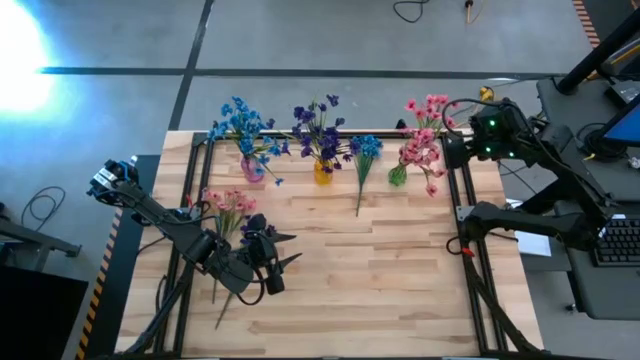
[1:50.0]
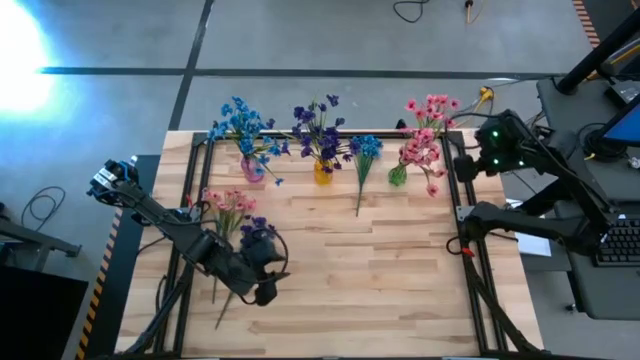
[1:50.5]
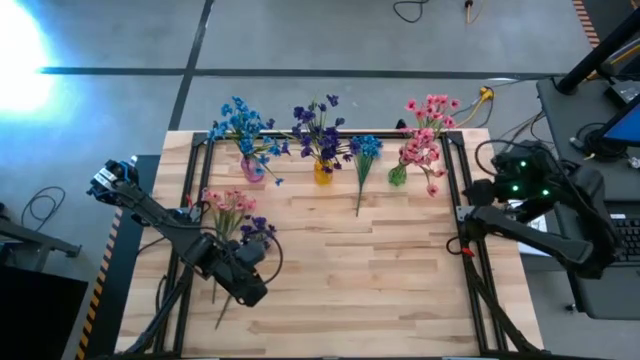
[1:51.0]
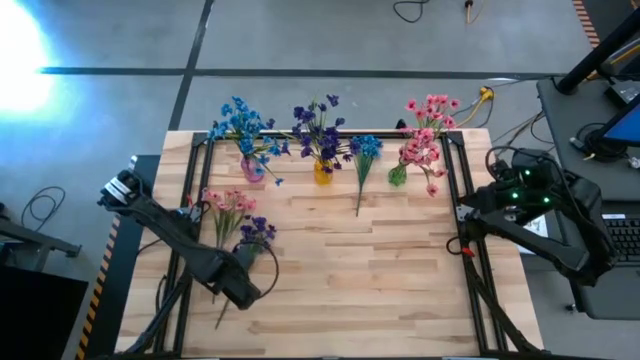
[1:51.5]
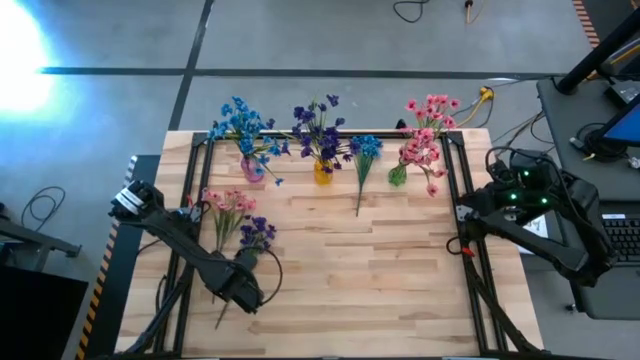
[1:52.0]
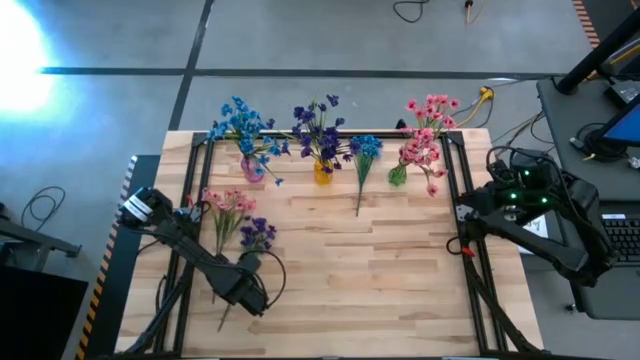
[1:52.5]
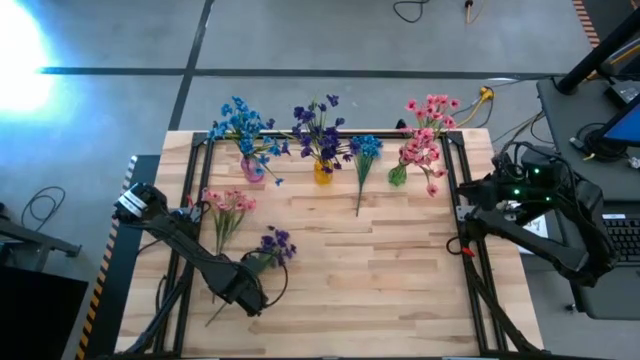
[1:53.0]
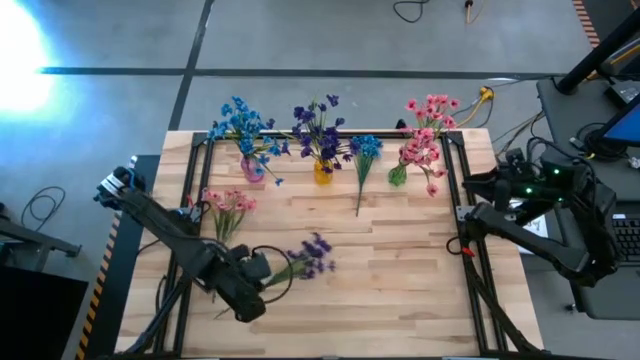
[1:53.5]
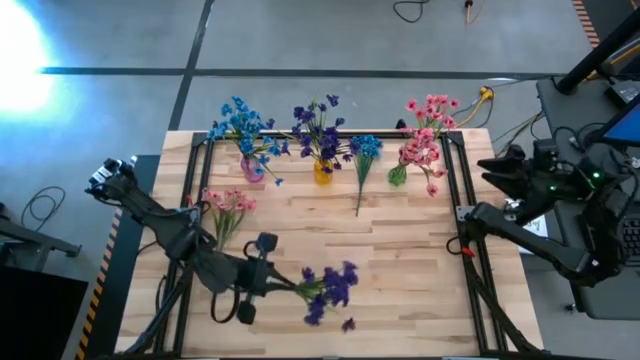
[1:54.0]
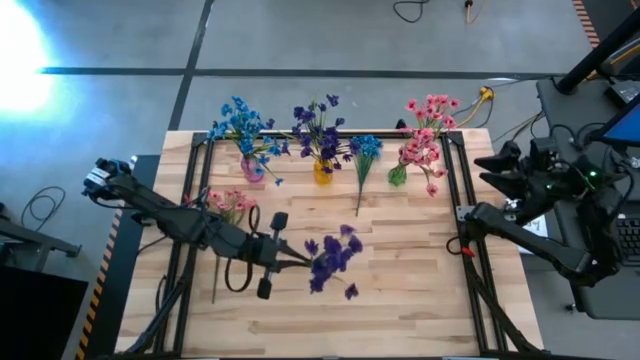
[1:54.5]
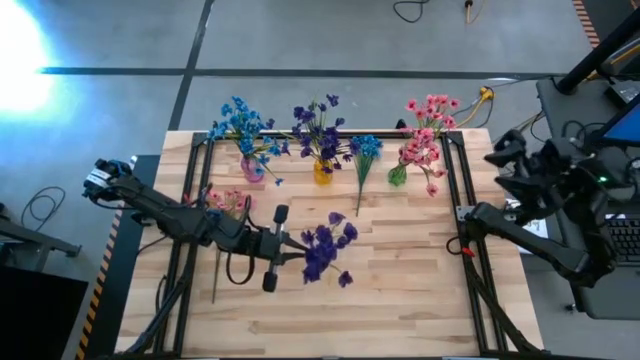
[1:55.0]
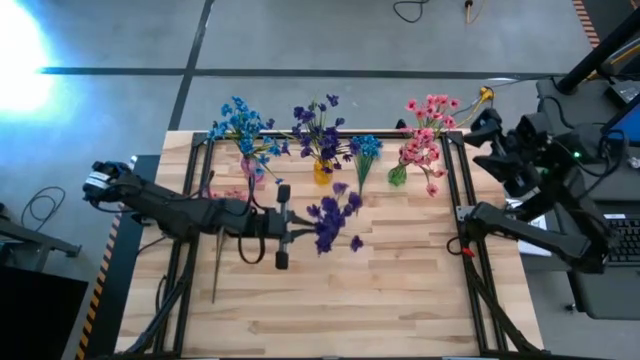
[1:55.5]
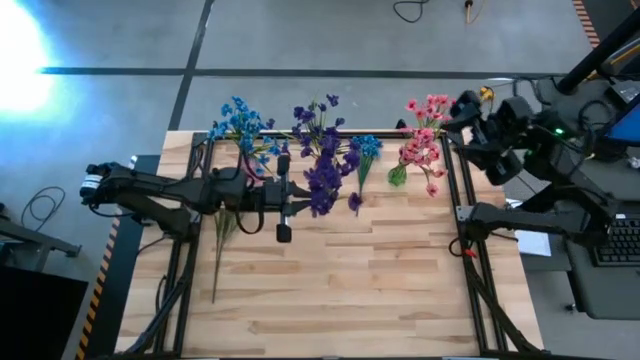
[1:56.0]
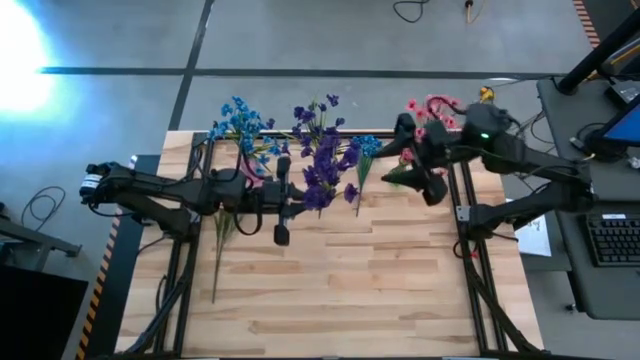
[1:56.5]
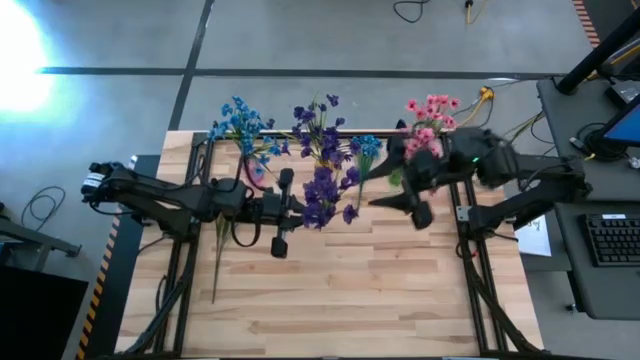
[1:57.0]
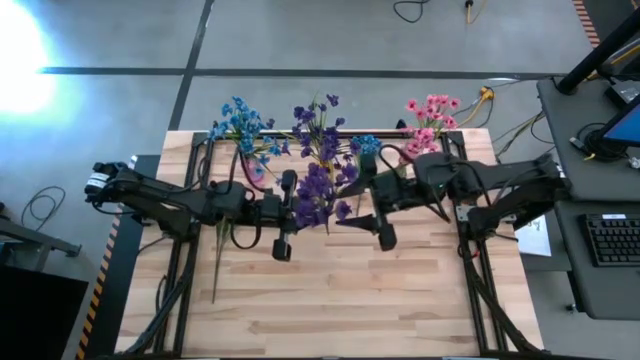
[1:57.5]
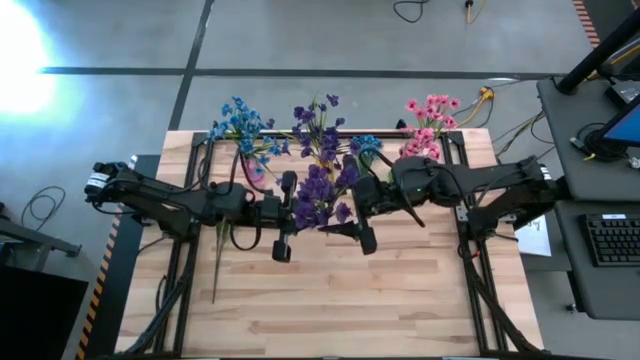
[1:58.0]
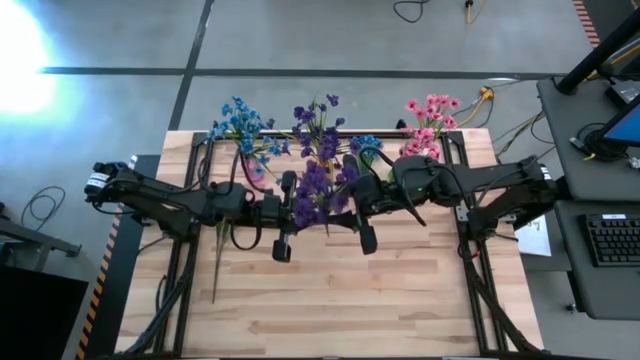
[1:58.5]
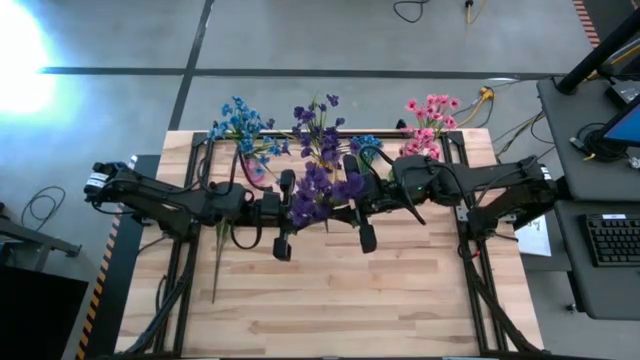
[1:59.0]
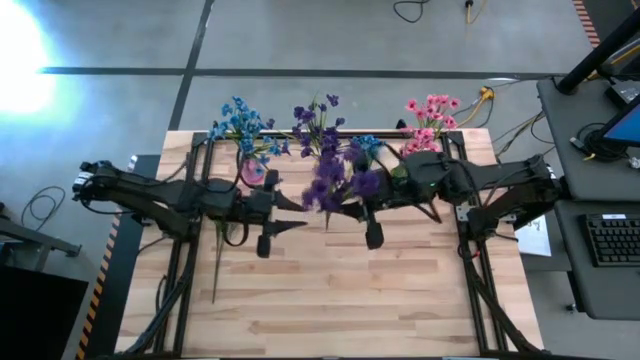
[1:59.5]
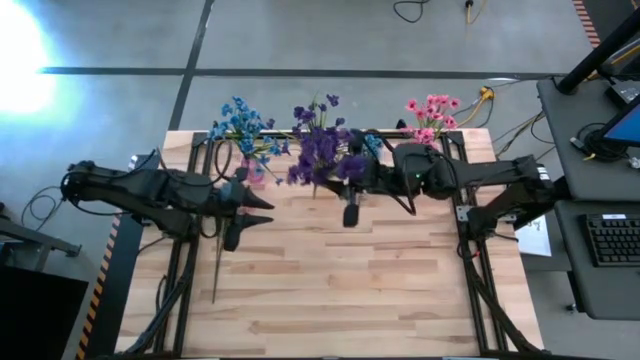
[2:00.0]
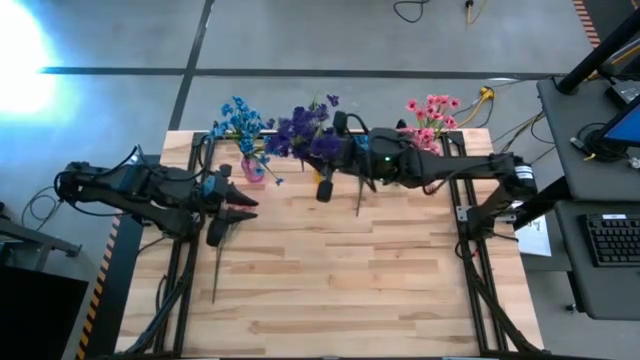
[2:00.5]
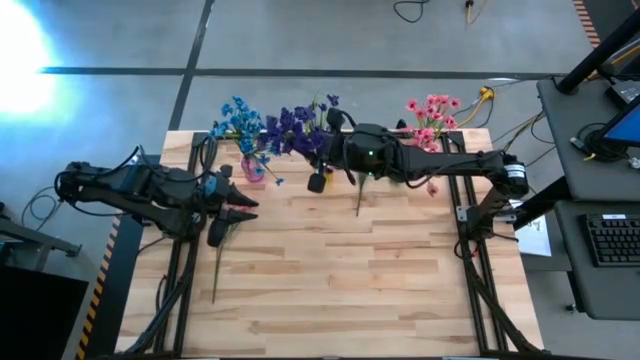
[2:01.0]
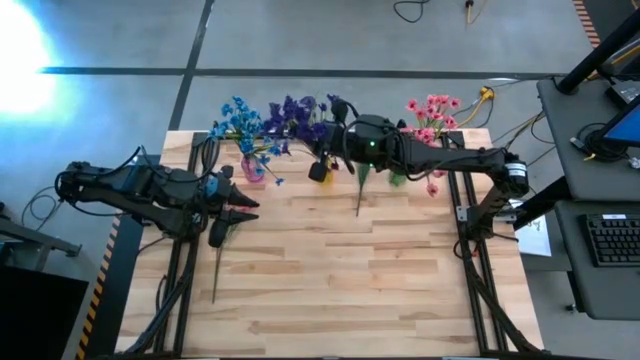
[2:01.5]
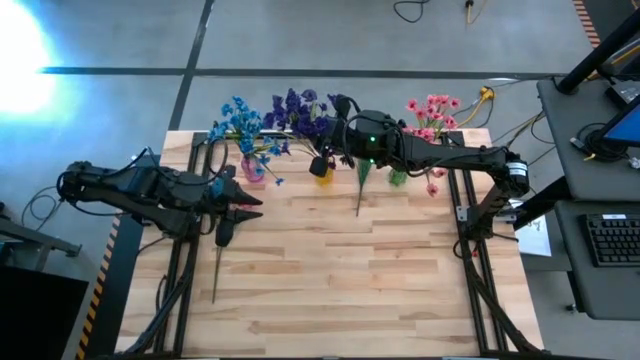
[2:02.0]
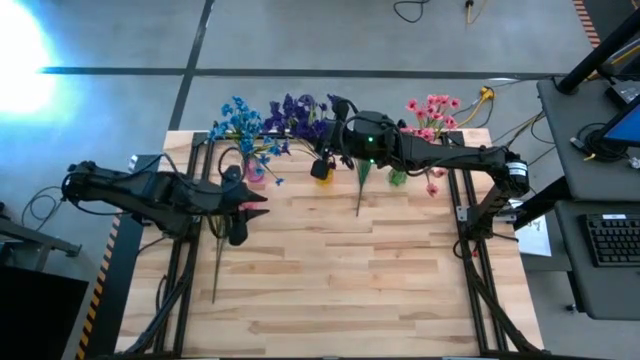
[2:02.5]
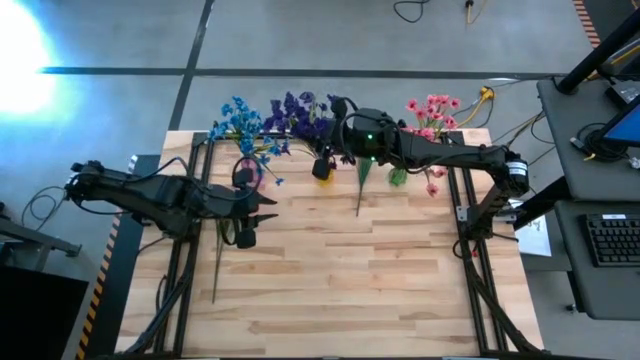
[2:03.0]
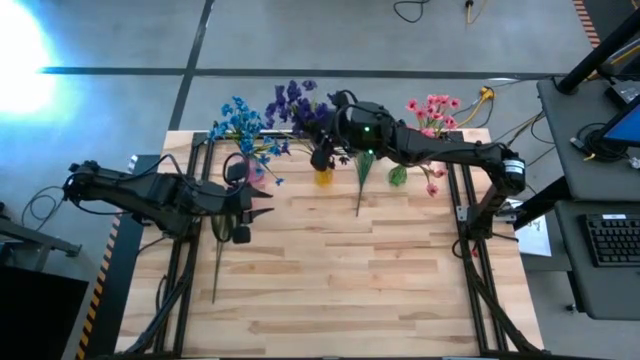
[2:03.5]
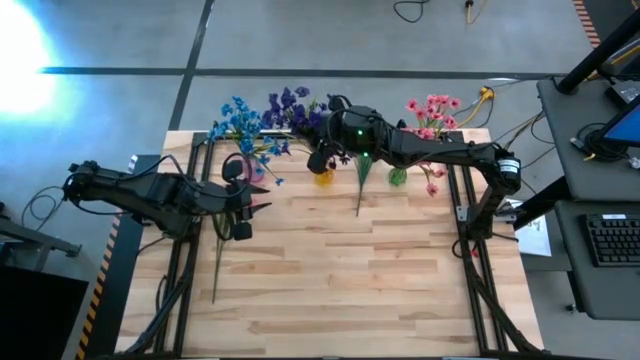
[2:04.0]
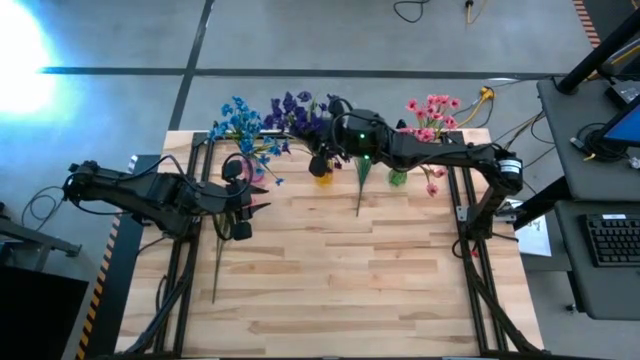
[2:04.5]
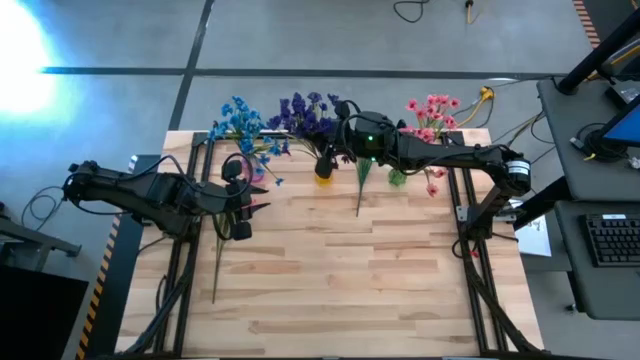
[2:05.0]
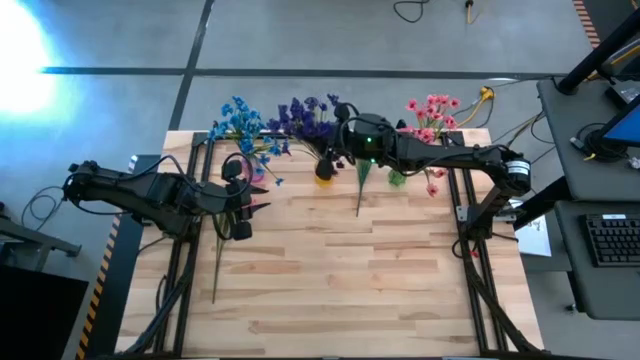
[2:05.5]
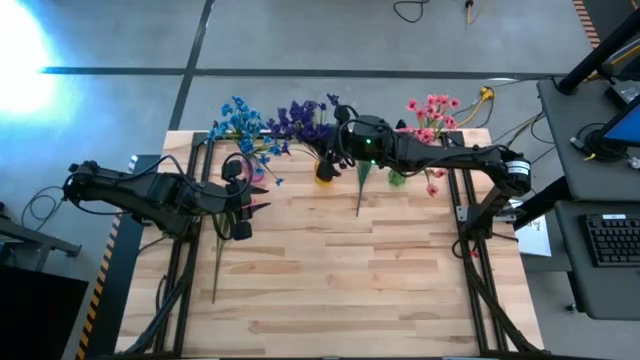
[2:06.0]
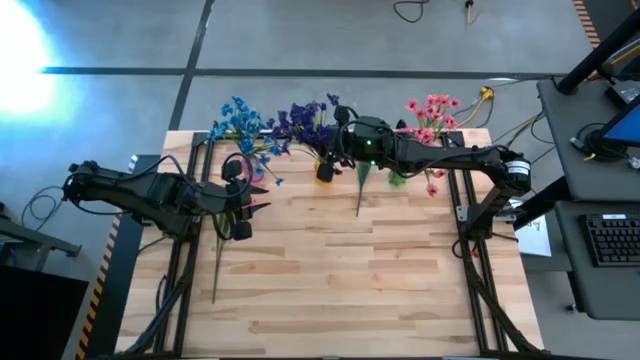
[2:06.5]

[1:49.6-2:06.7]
Task: Sort flowers into vase by color
Put the violet flowers into the yellow vase

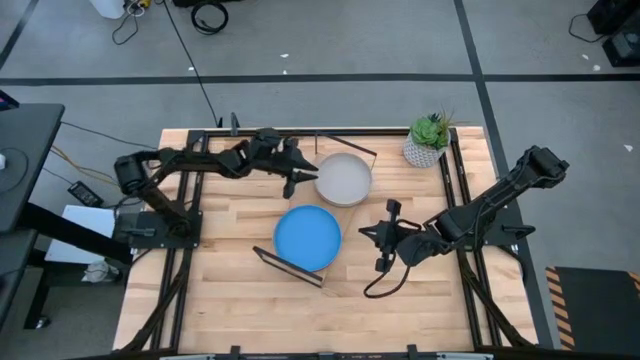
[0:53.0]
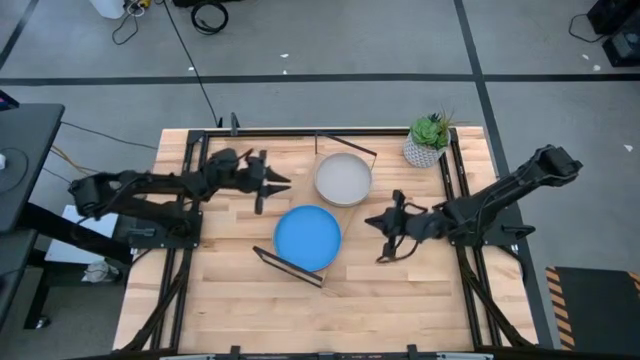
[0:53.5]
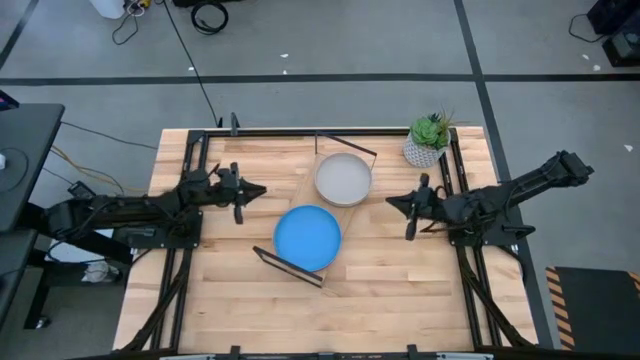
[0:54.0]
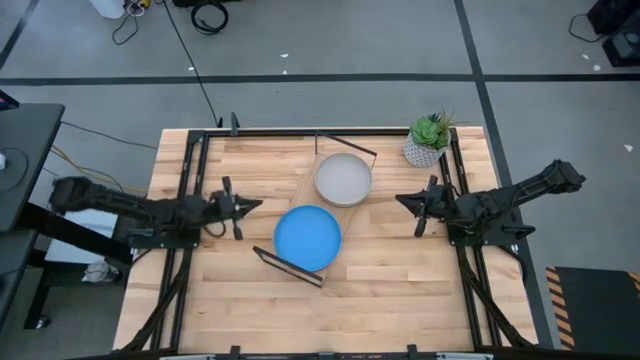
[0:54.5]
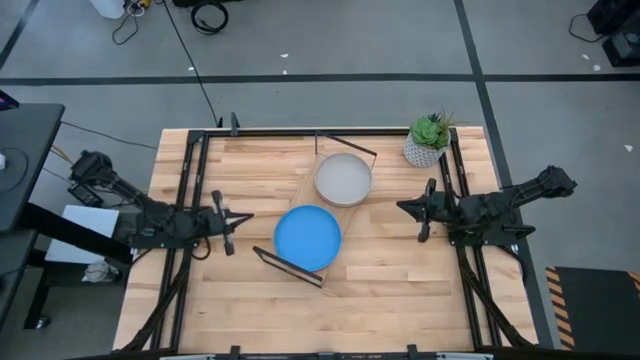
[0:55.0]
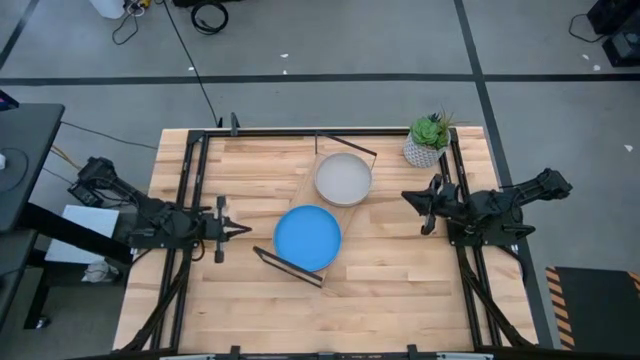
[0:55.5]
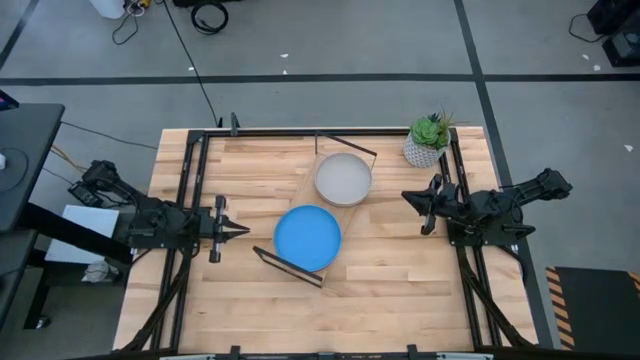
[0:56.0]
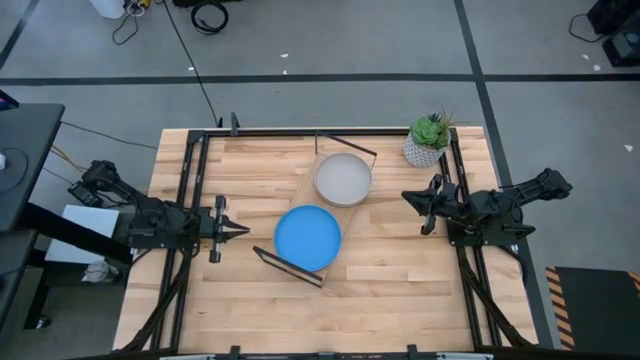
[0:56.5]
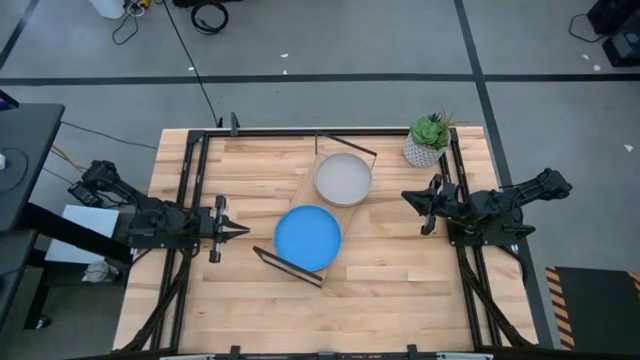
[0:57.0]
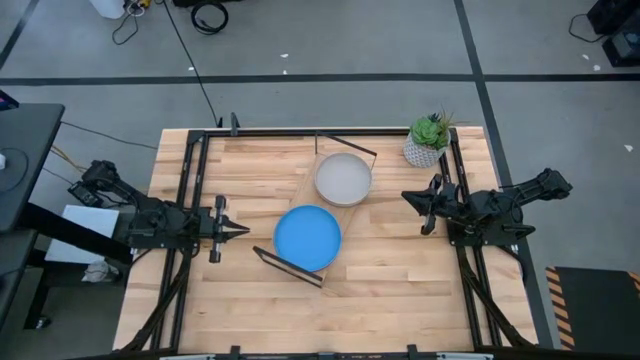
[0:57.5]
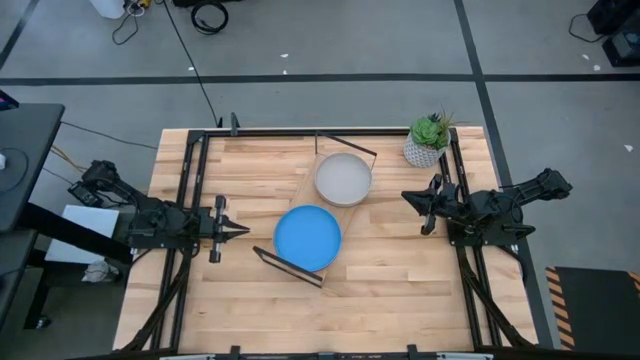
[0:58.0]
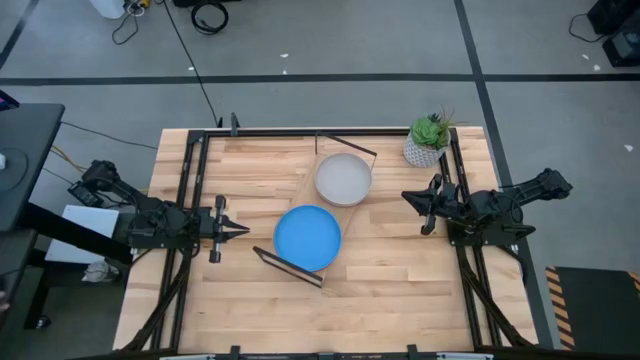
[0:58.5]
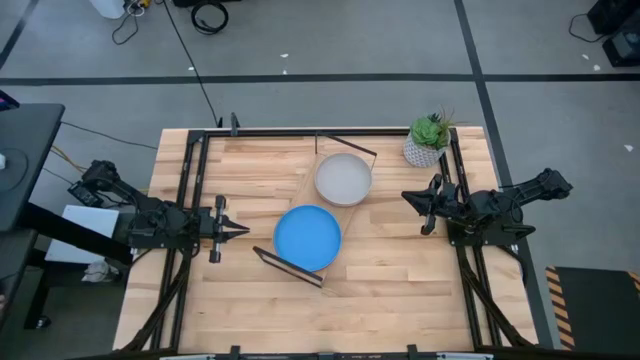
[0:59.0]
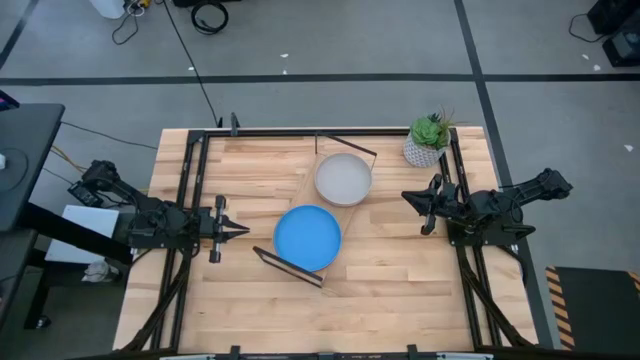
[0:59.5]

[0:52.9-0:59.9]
Task: Place and stack plates onto a shelf
Return to Home Position
